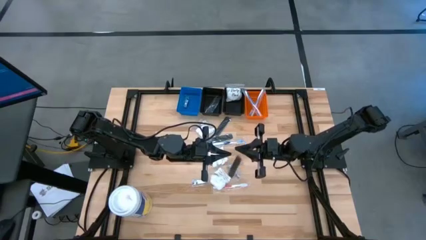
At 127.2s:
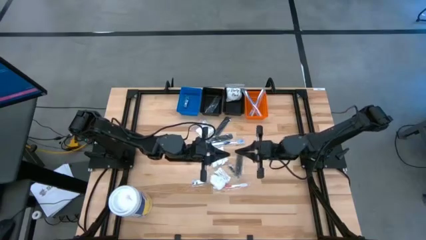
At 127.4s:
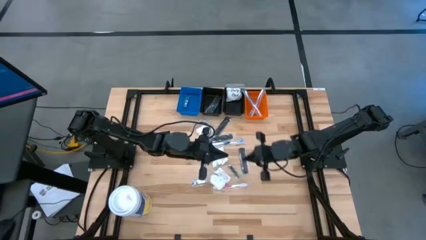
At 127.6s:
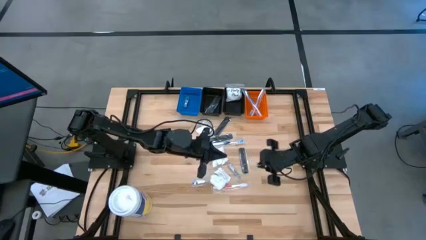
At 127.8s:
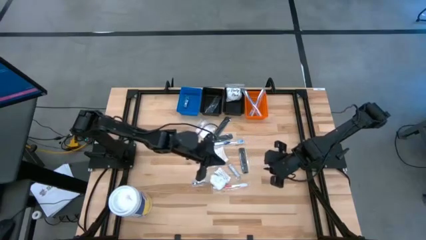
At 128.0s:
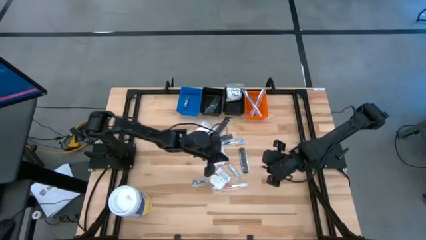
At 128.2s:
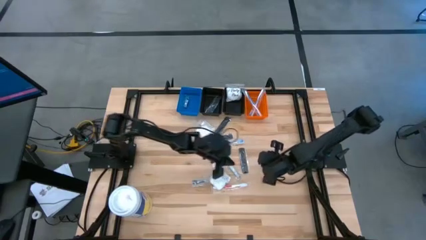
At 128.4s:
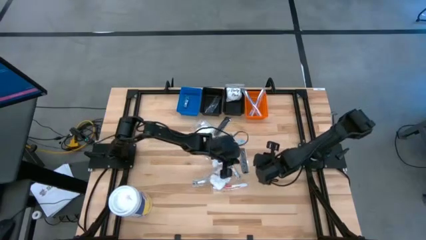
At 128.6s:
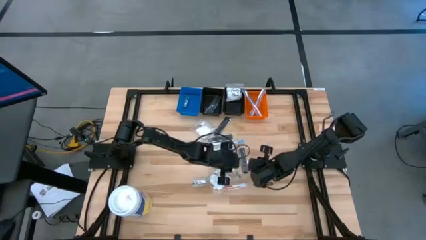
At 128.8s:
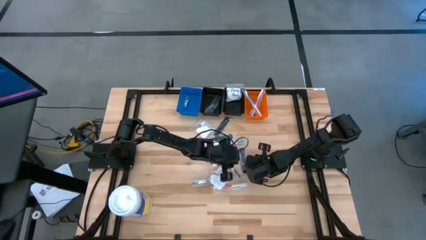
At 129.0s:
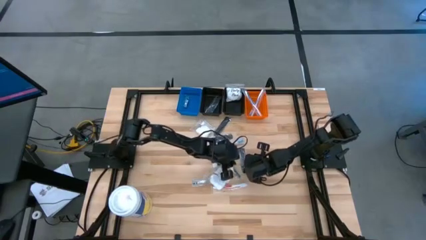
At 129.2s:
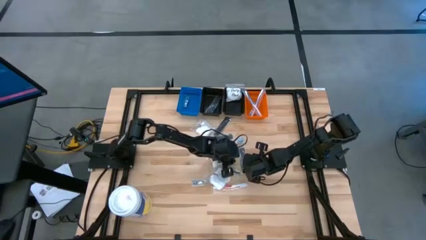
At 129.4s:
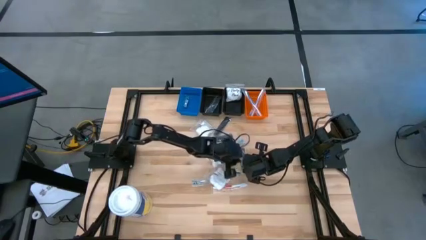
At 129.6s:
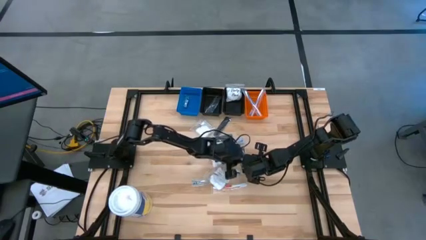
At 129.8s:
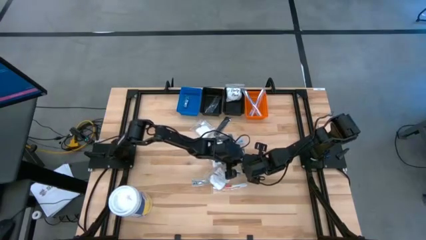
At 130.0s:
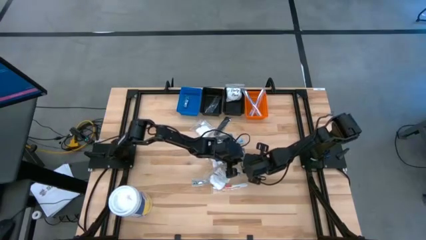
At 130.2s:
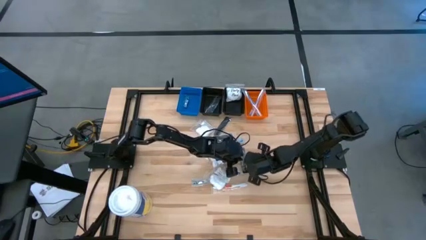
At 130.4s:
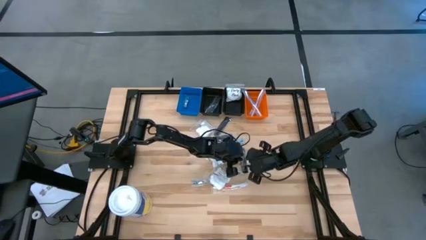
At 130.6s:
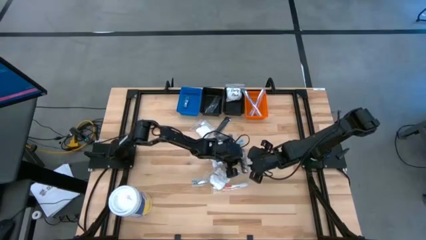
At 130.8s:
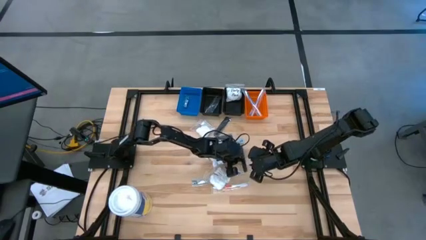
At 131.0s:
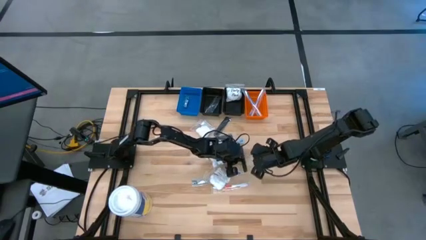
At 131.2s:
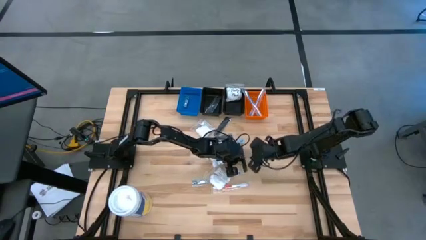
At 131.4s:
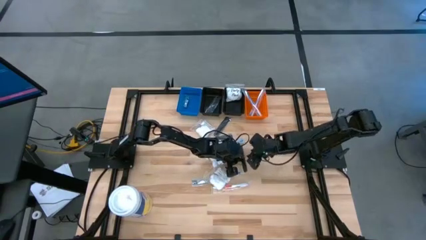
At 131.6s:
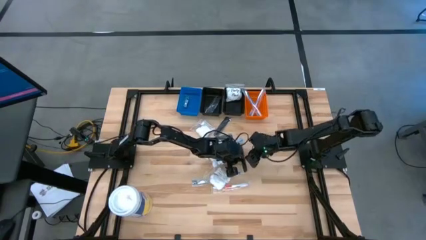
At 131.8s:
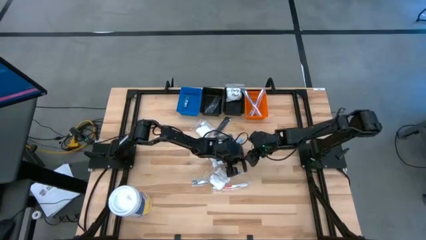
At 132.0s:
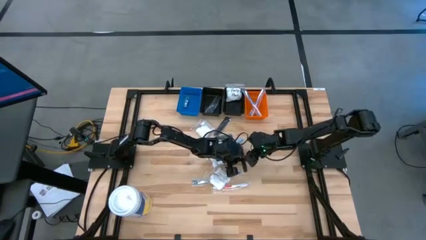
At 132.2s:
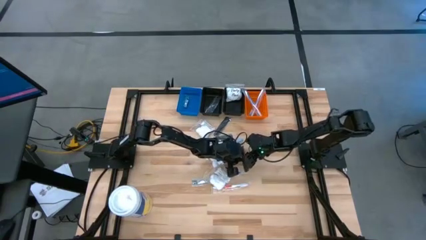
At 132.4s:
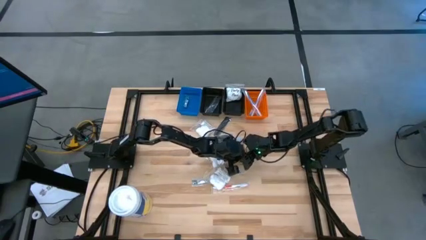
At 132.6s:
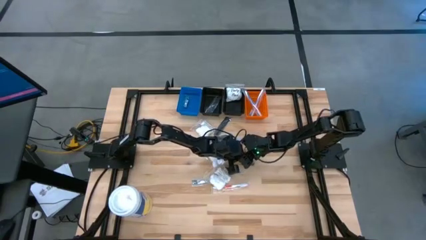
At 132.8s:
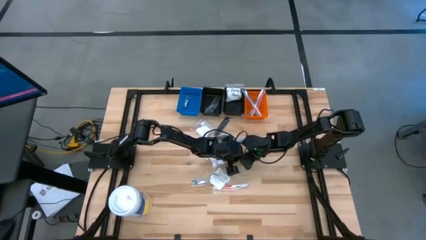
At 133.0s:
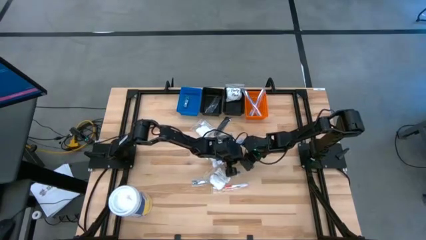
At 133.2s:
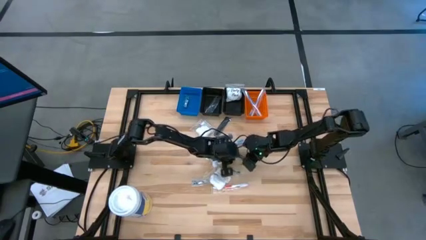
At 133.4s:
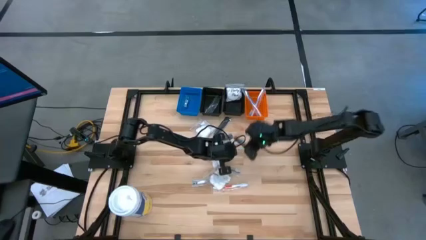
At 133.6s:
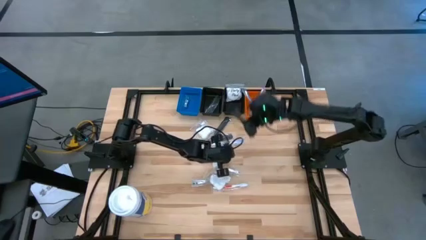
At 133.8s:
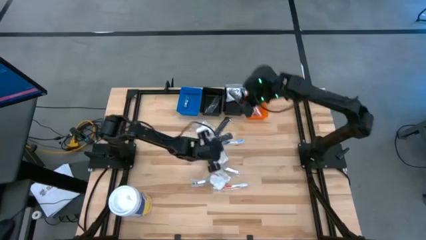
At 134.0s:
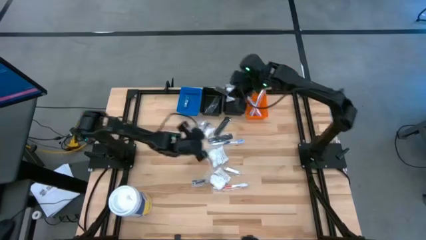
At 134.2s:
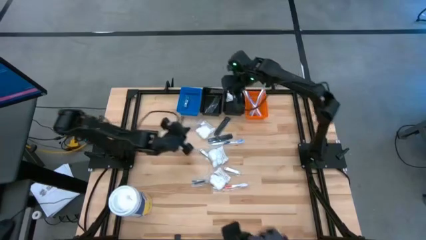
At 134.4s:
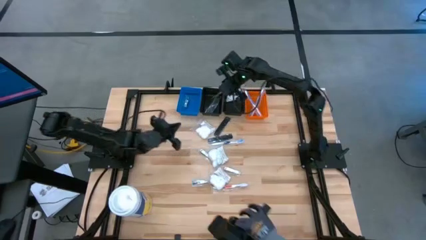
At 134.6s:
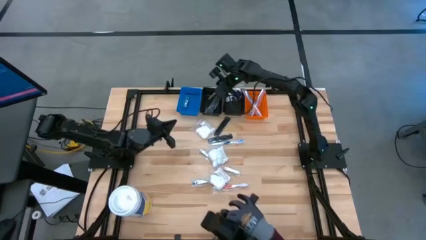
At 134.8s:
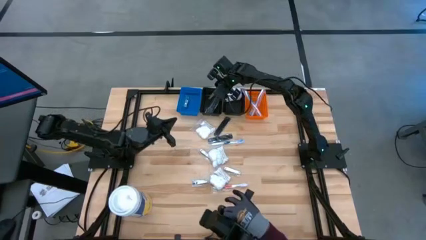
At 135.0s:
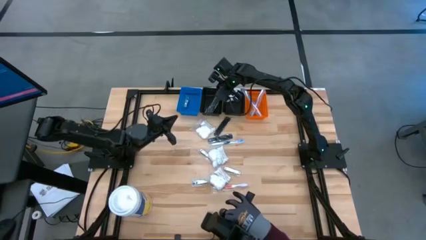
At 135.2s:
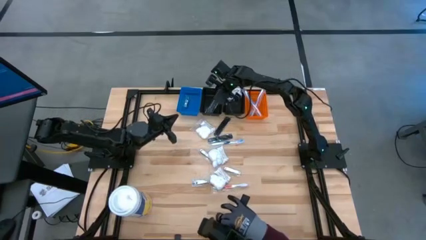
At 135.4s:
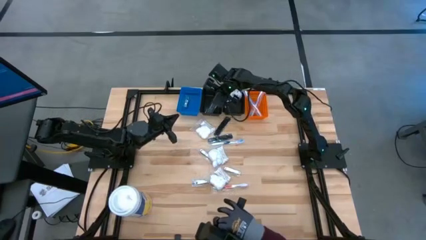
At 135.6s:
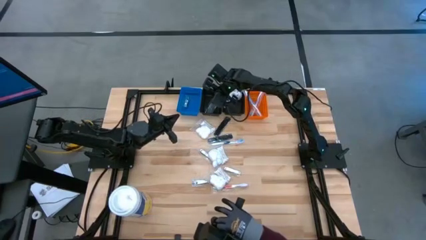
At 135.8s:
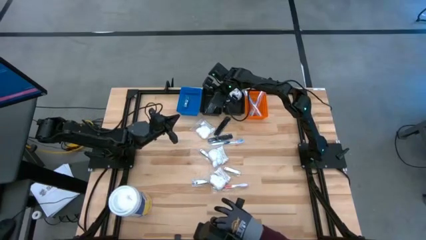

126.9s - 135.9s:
Task: Pick & Place Travel size toiletries
Put the black comb into the left black bin

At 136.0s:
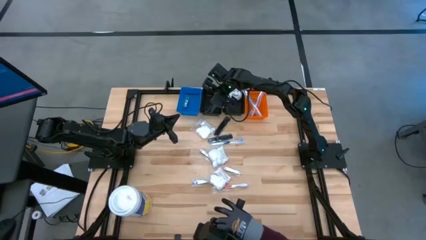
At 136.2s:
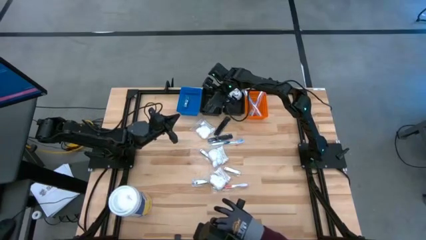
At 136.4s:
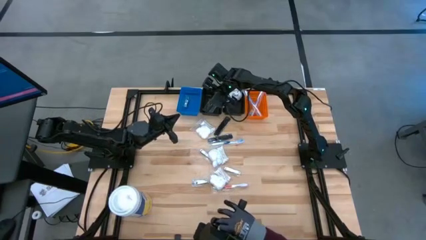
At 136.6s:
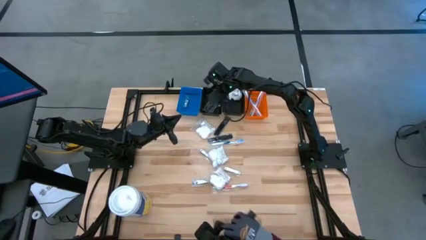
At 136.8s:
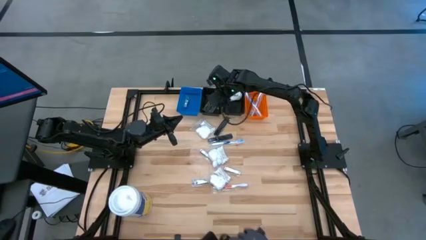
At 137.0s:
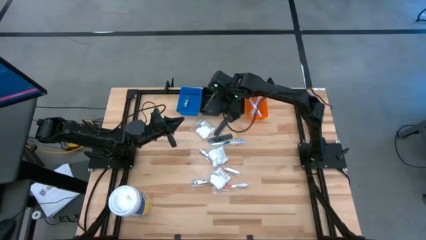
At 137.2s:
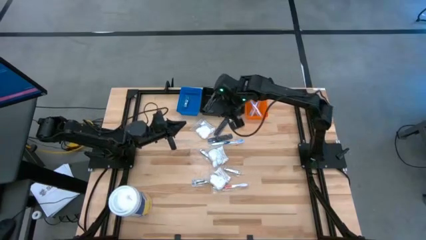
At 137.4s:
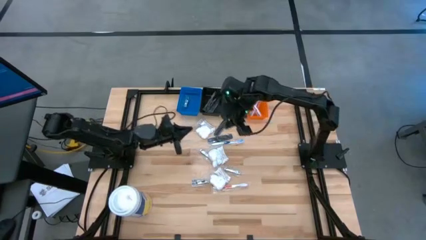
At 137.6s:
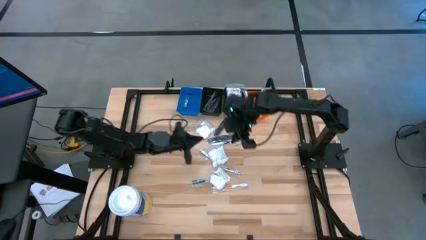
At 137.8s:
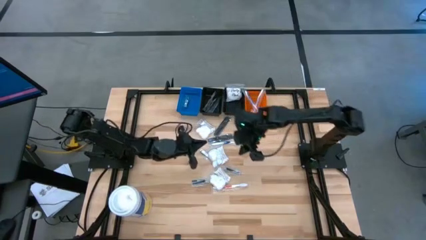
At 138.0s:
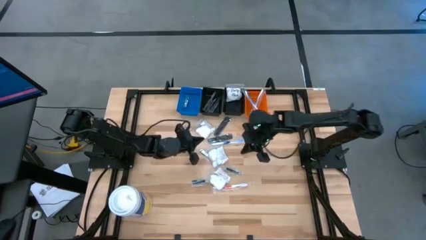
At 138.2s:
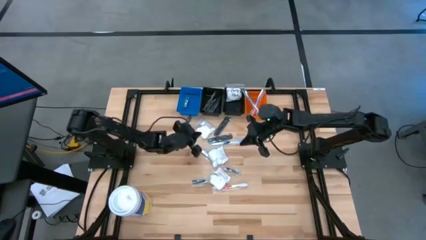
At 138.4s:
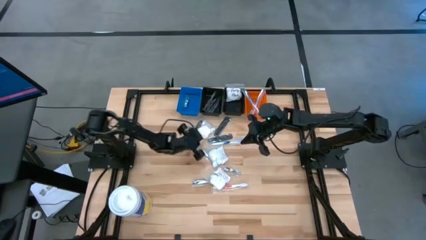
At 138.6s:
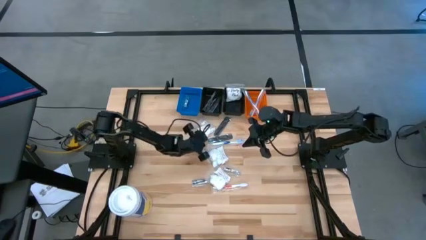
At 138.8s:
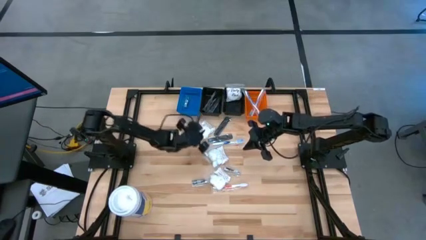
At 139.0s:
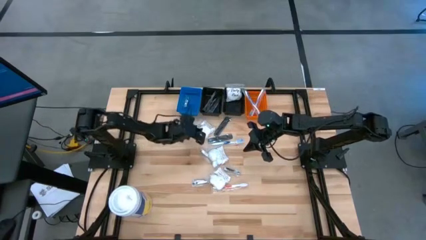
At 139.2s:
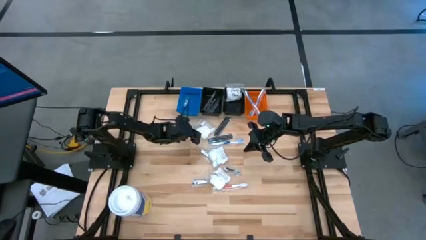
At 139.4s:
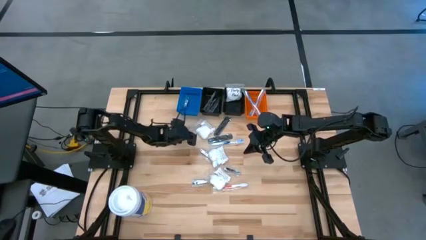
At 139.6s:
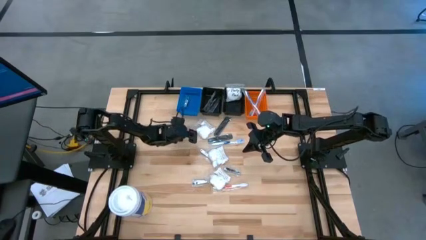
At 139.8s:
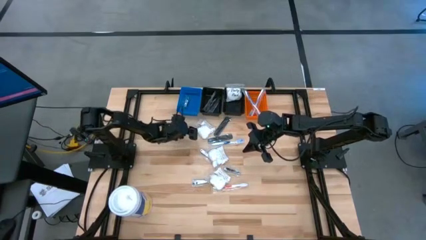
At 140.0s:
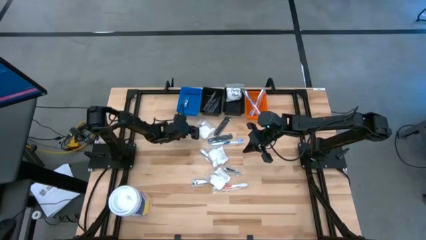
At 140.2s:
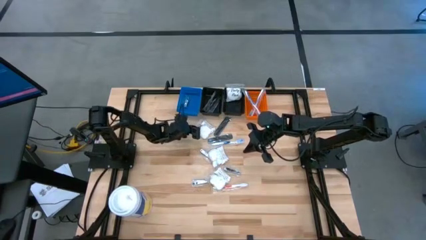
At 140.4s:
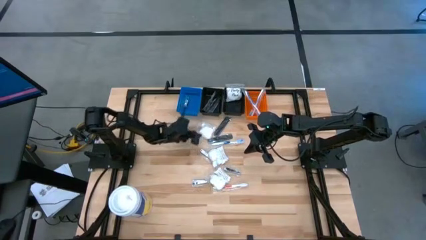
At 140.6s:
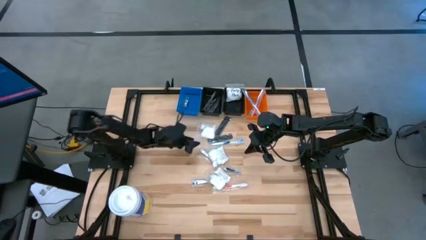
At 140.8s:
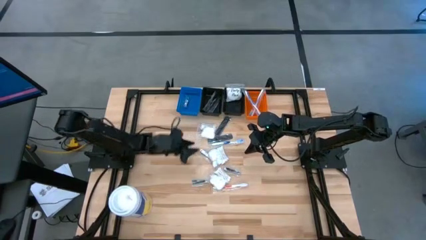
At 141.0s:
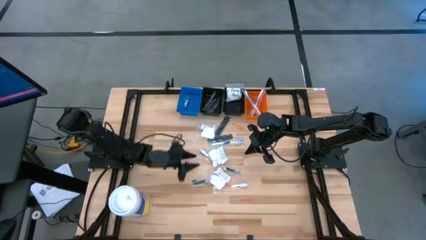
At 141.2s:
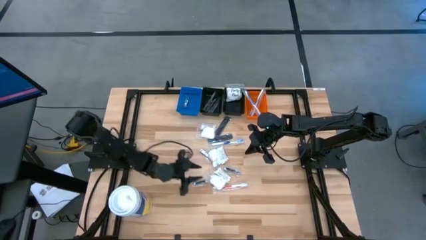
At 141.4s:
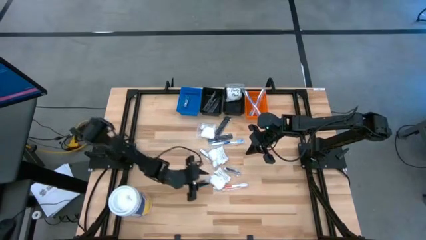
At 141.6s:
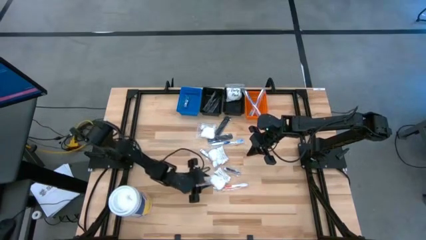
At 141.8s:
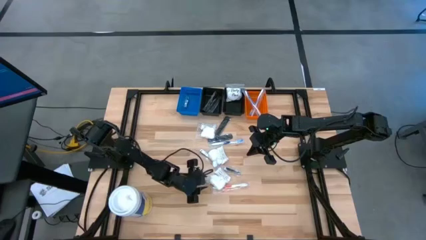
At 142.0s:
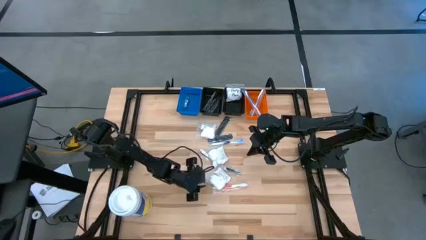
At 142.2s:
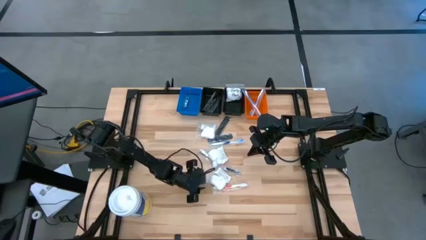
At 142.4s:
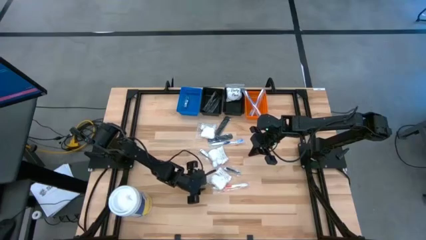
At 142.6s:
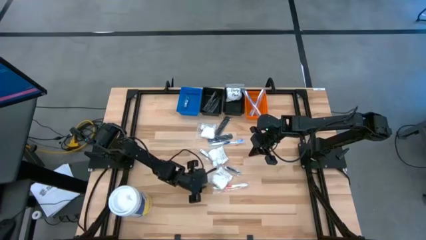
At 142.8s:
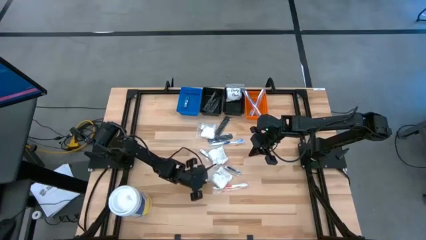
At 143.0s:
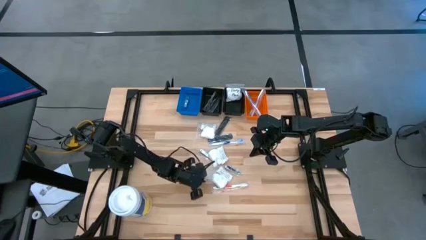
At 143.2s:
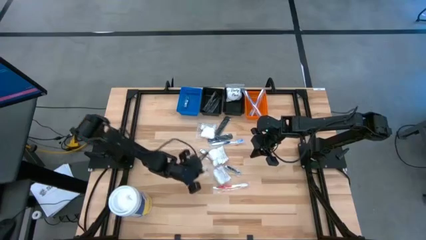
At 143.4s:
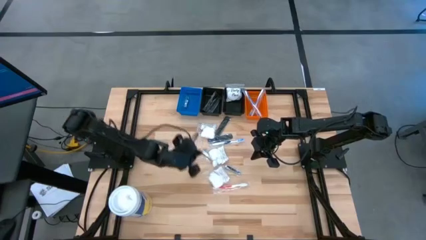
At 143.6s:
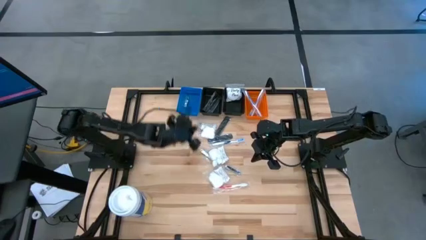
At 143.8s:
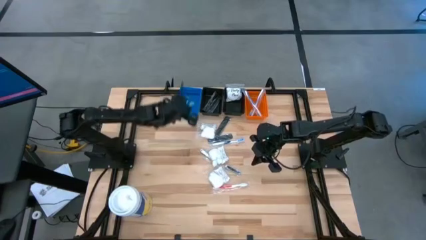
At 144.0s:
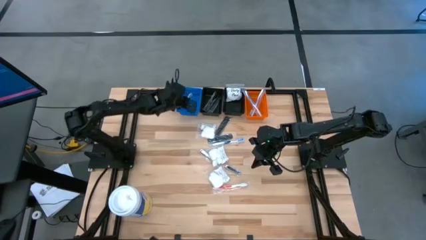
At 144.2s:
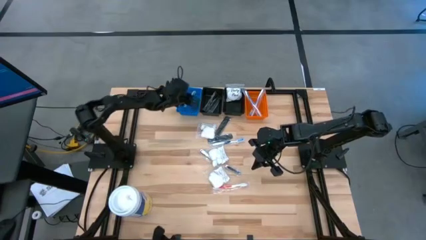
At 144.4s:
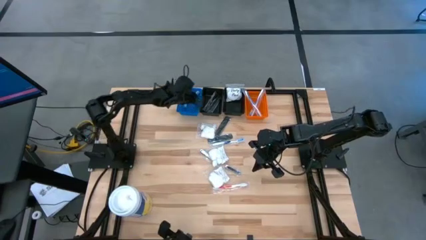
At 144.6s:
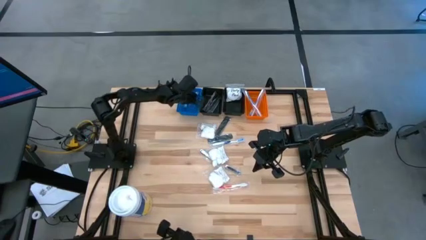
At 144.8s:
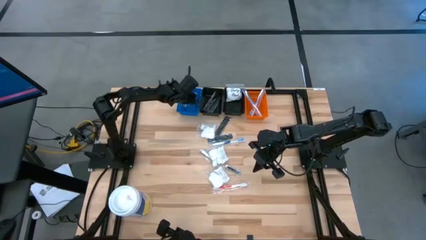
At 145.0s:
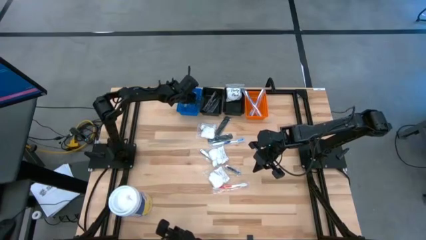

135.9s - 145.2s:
Put the silver nail cutter into the blue bin
